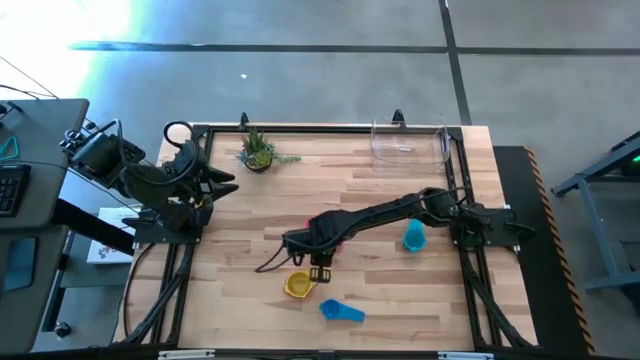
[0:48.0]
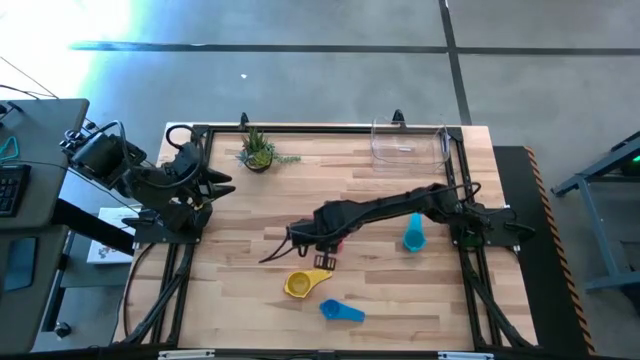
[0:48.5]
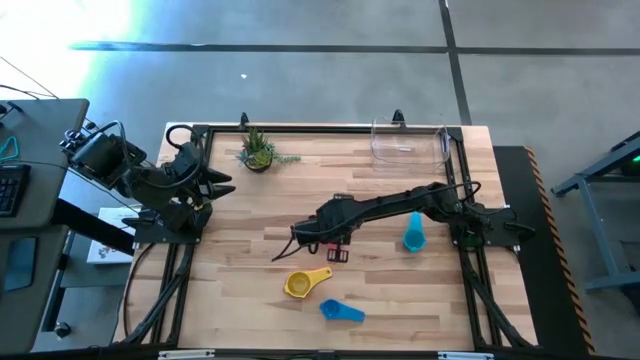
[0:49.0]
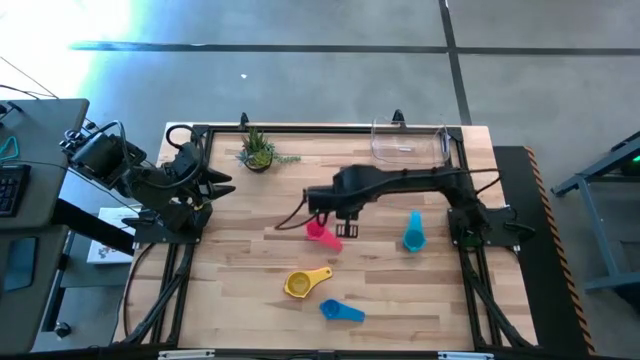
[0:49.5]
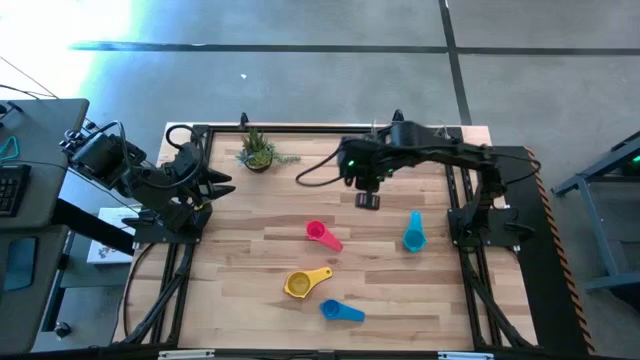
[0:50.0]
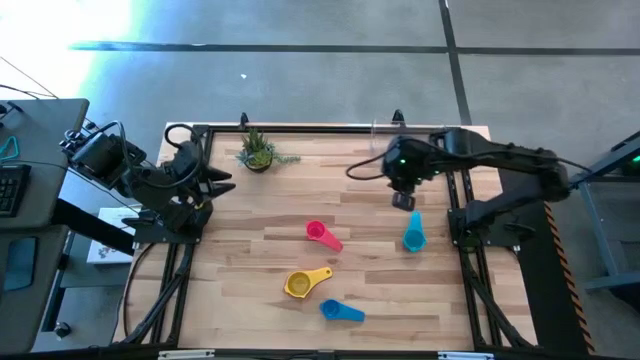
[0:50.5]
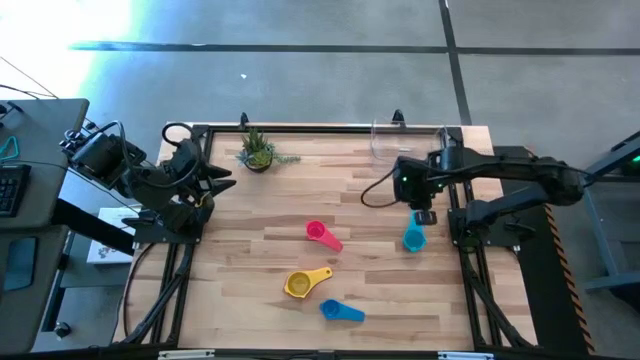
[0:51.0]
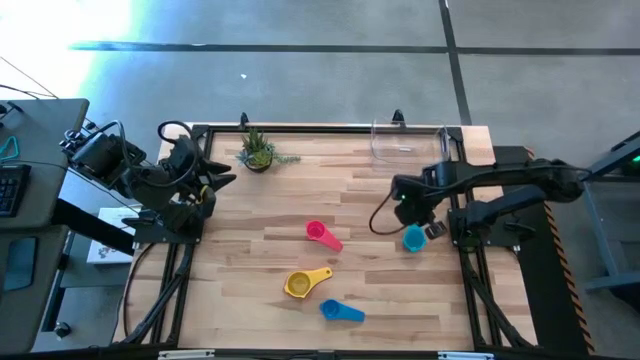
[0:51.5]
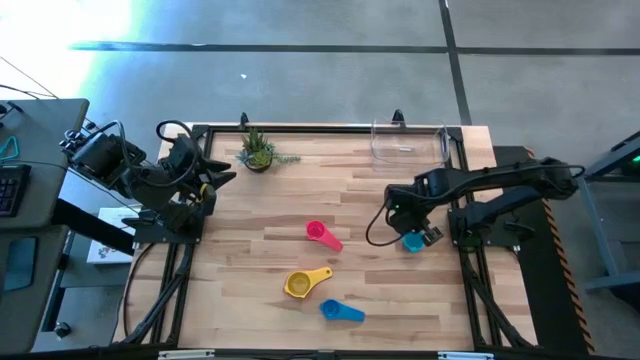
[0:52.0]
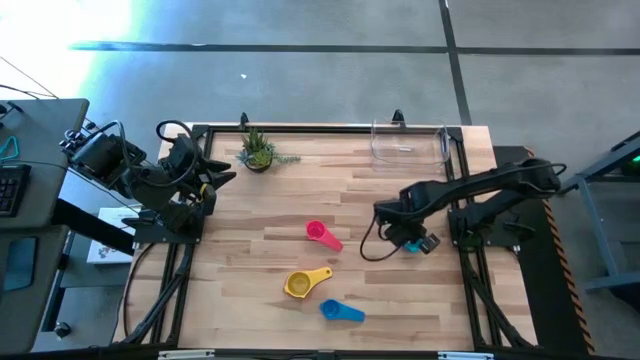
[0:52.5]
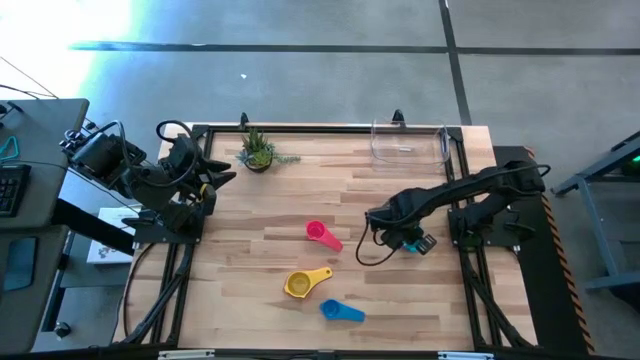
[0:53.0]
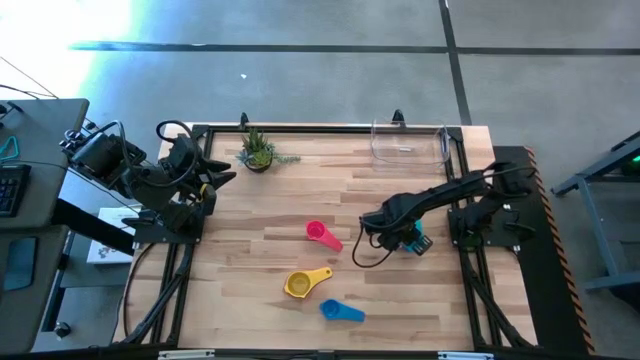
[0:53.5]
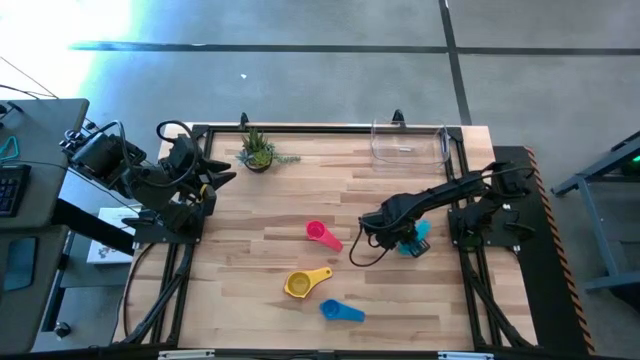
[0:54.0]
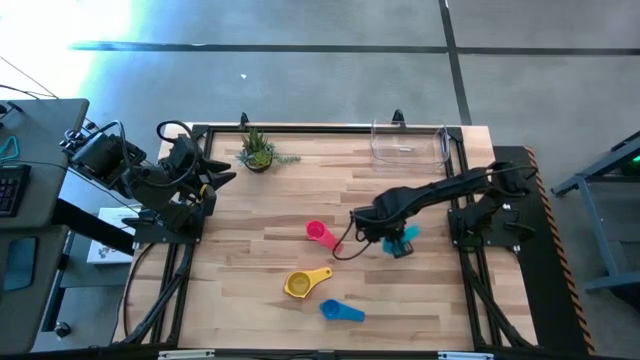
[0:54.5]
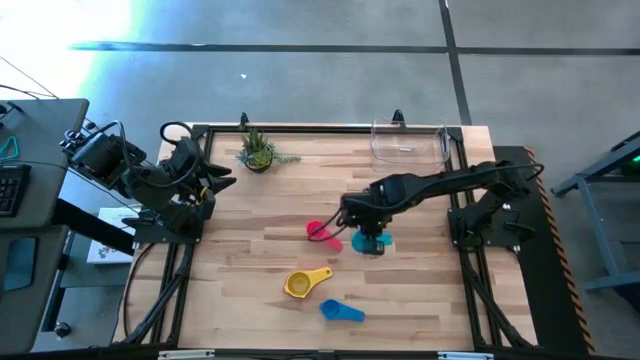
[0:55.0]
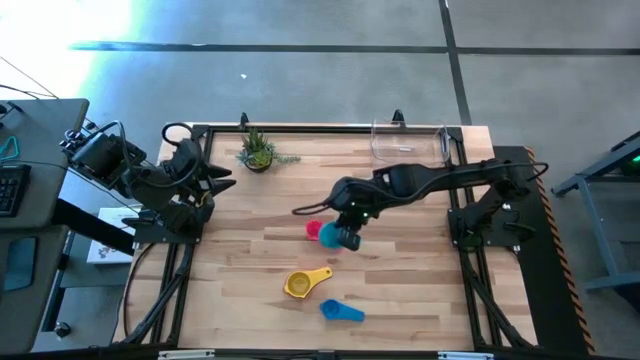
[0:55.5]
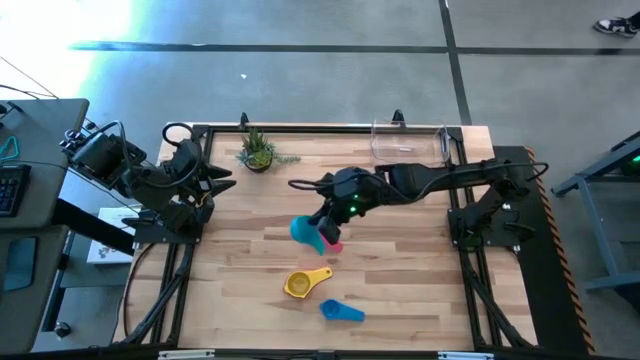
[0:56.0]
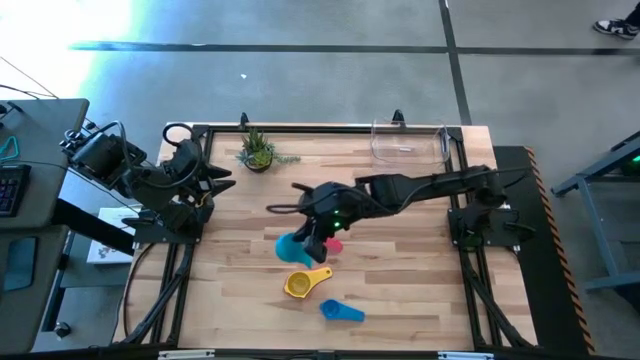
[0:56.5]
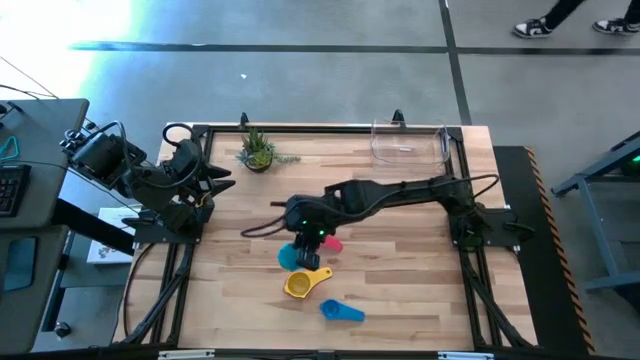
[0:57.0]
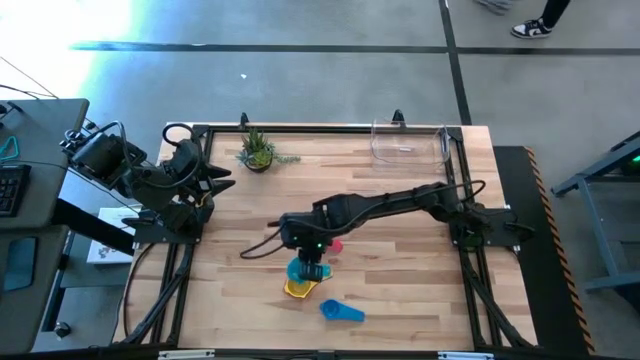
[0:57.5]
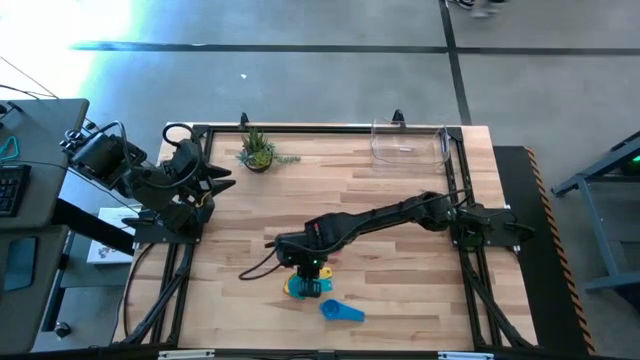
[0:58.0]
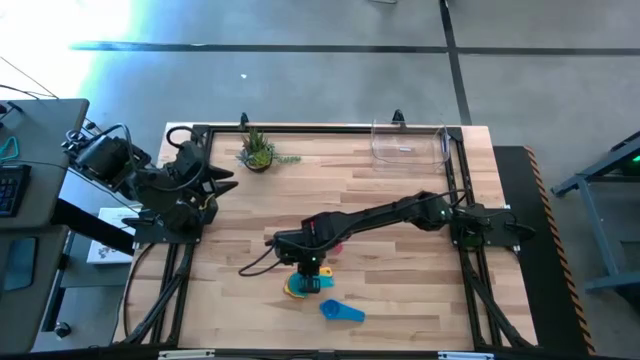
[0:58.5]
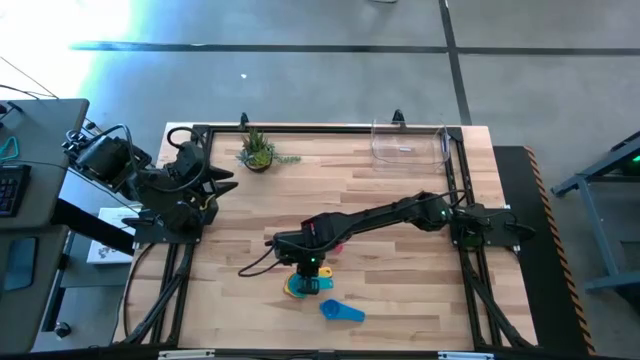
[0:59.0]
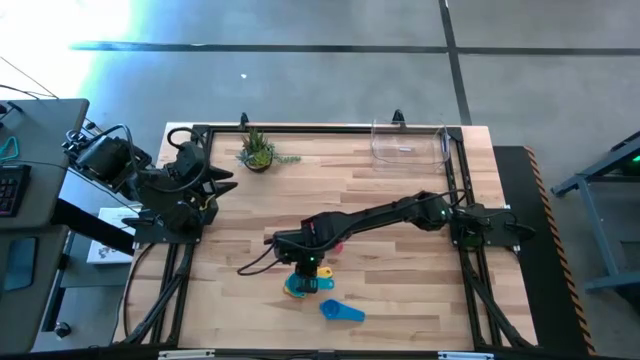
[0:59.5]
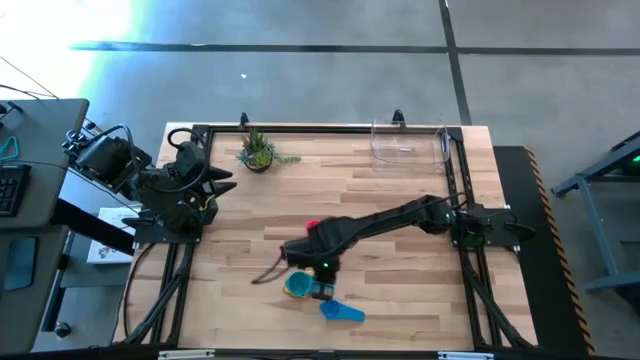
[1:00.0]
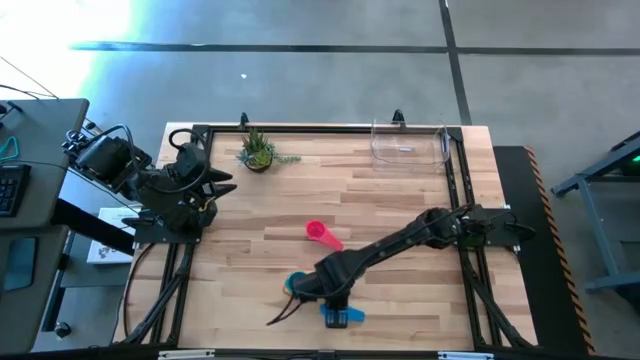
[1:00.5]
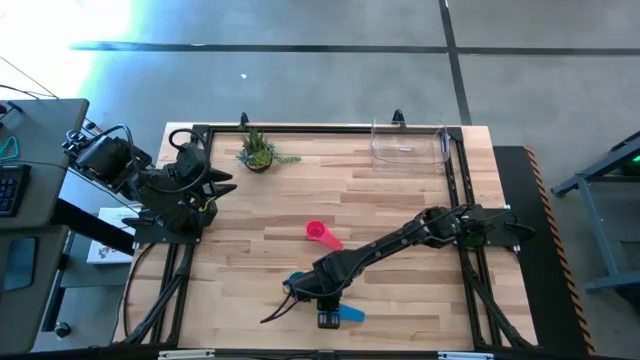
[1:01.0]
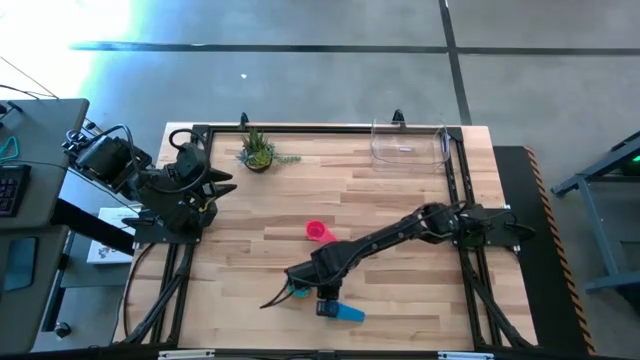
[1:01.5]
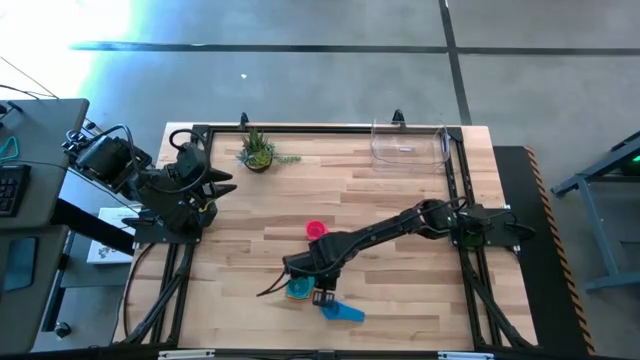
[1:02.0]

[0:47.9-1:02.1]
Task: Nest measuring cups in basket
Stack the light blue measuring cup on top of the yellow measuring cup

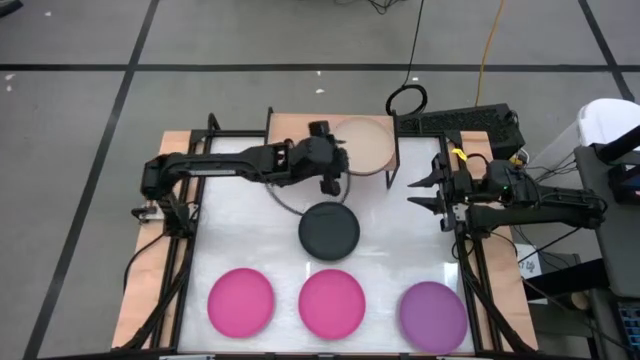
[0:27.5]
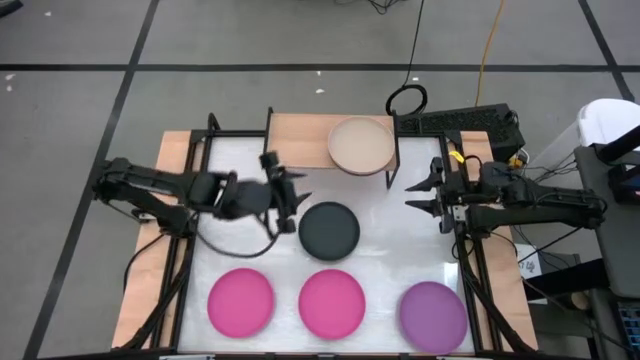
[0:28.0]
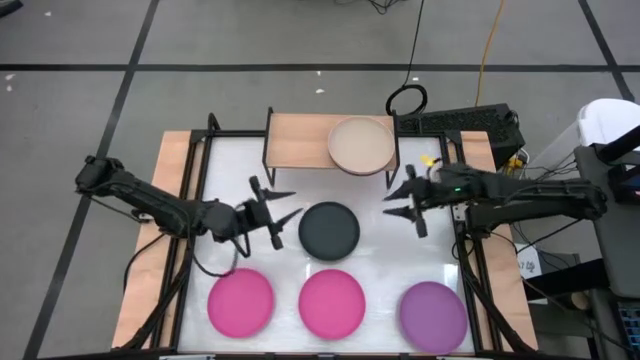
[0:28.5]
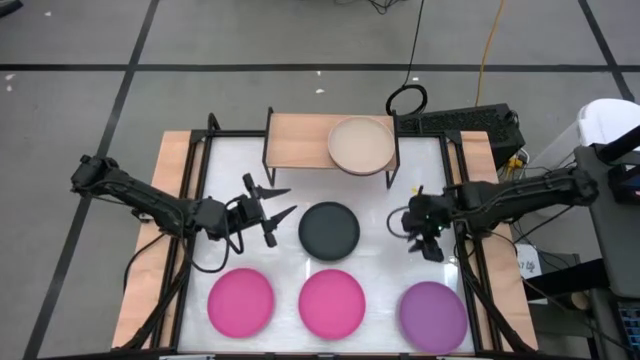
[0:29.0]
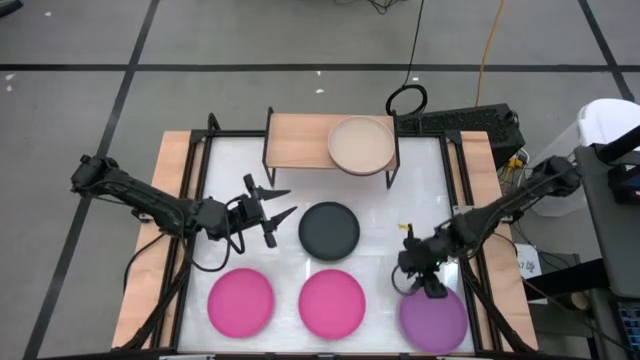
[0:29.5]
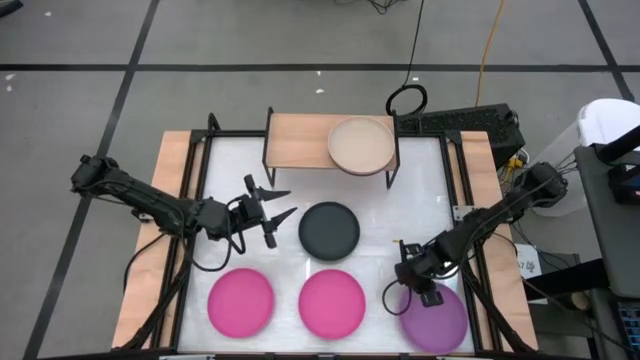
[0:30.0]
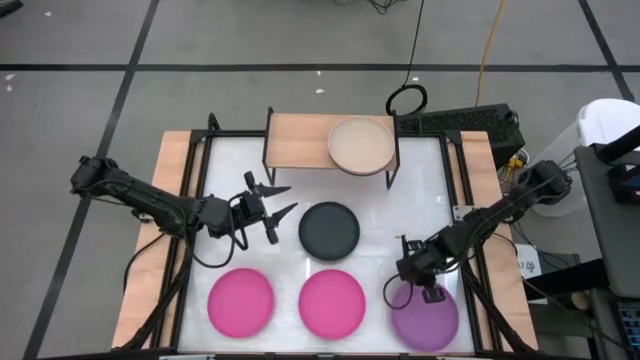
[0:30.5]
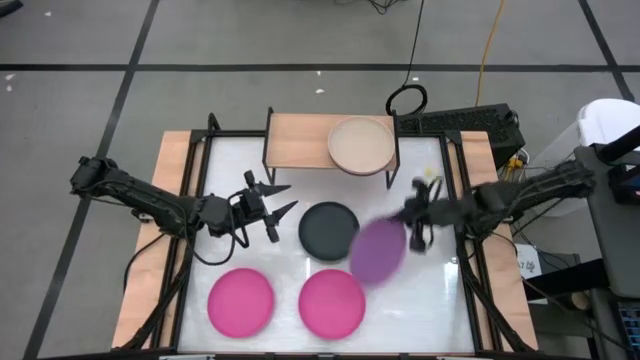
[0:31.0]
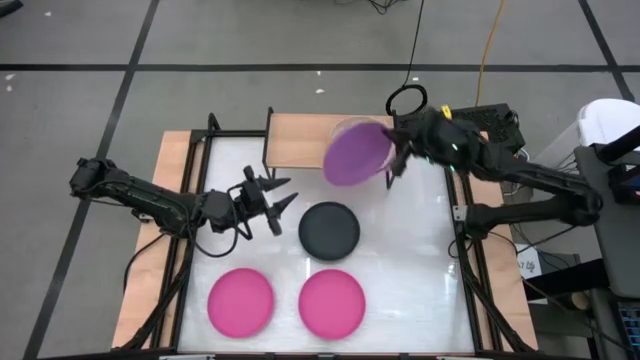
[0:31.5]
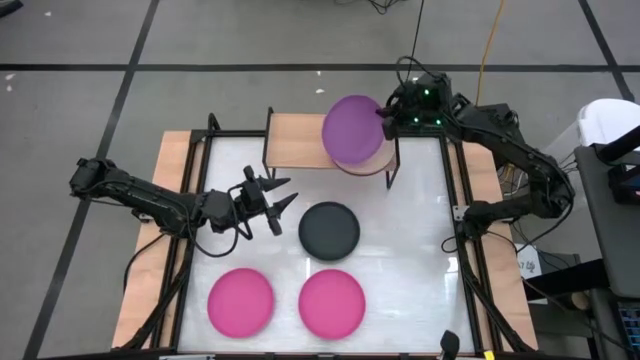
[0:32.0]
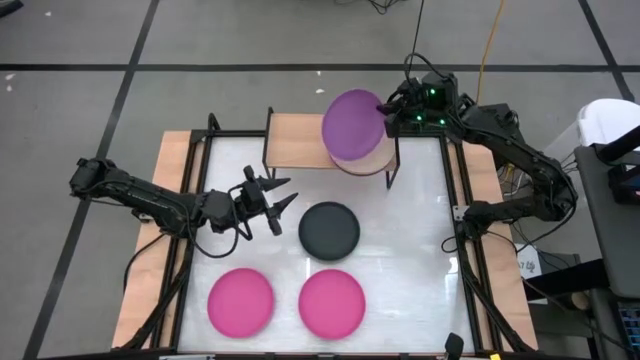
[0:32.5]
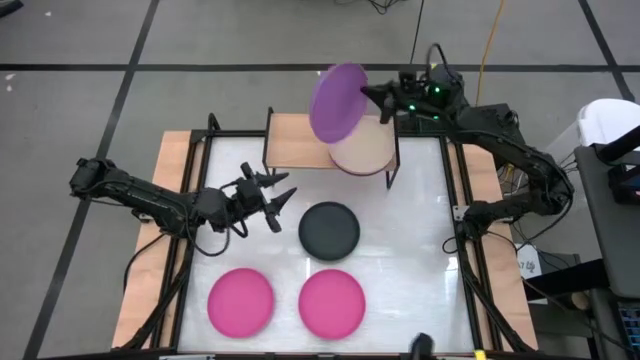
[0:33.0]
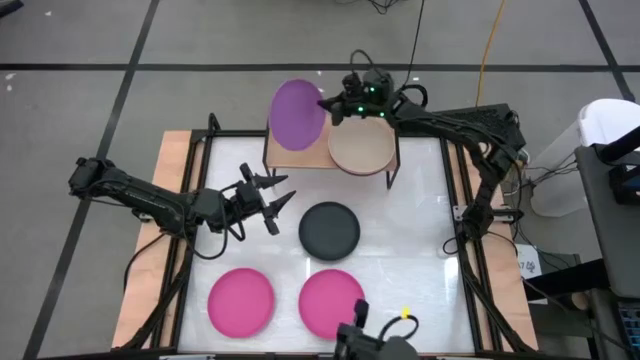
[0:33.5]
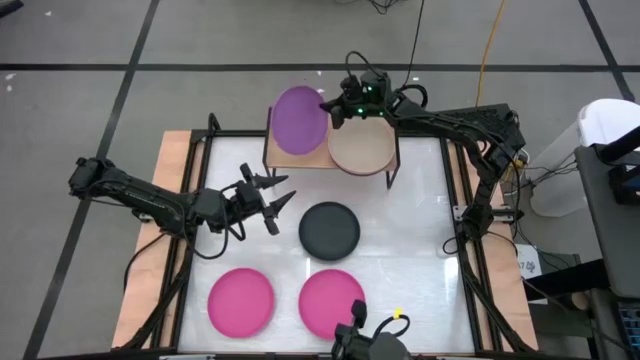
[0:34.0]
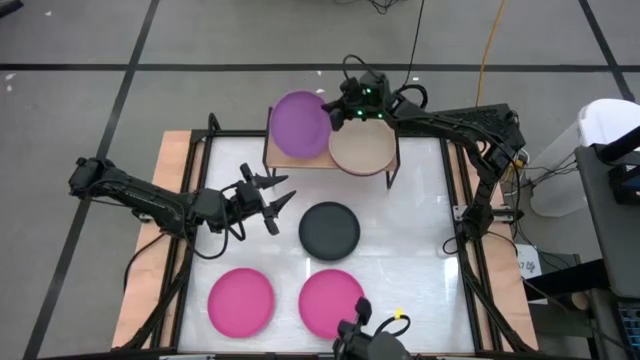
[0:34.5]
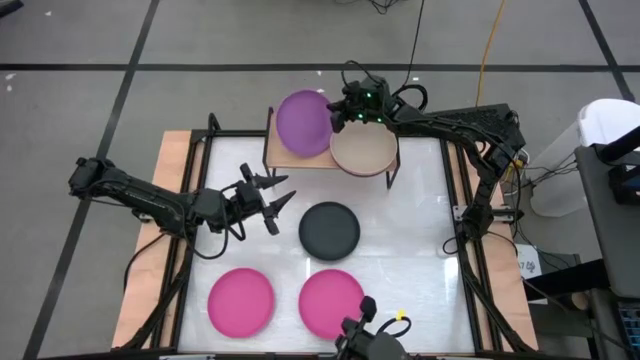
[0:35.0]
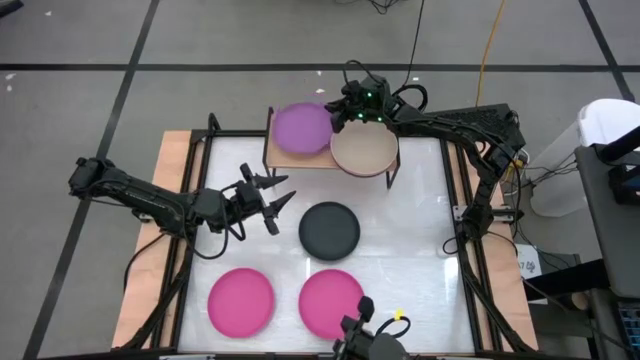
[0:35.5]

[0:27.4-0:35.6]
Task: Place and stack plates onto a shelf
Put the violet plate on the shelf
